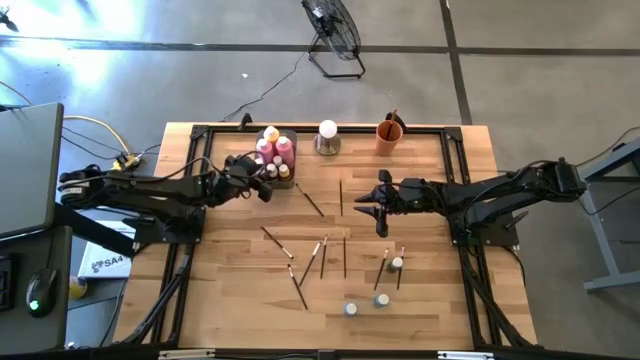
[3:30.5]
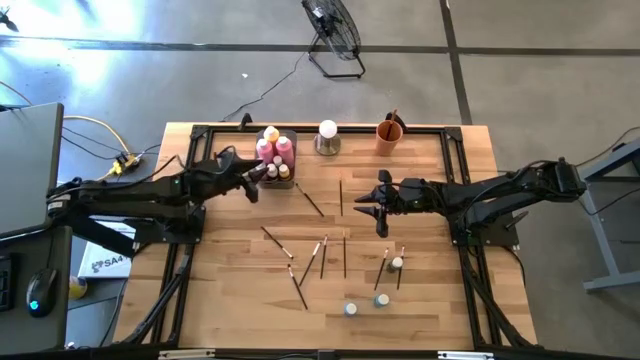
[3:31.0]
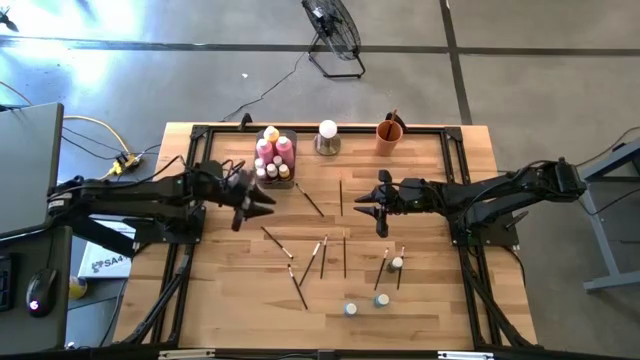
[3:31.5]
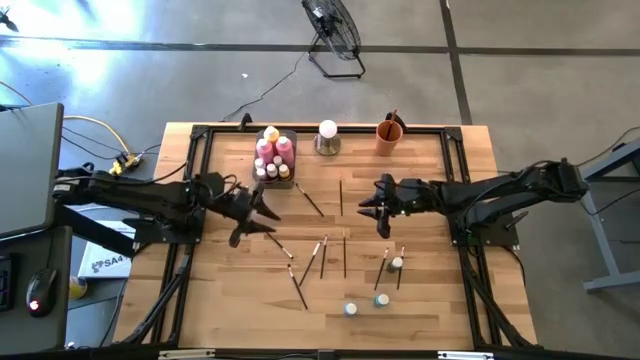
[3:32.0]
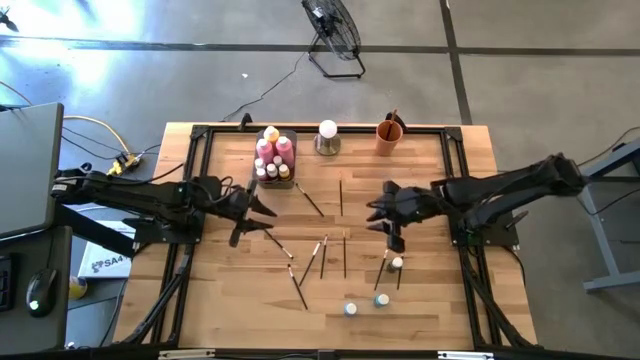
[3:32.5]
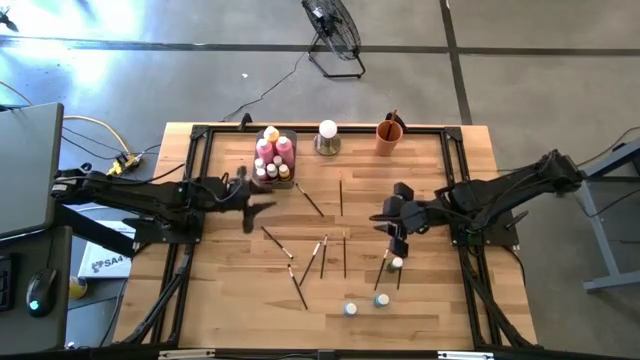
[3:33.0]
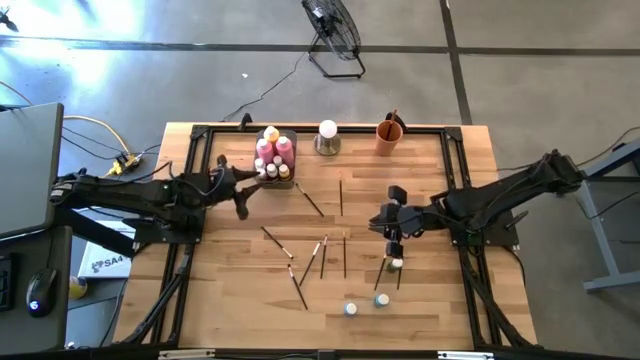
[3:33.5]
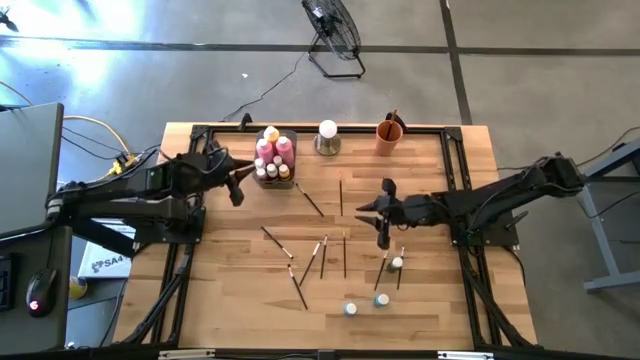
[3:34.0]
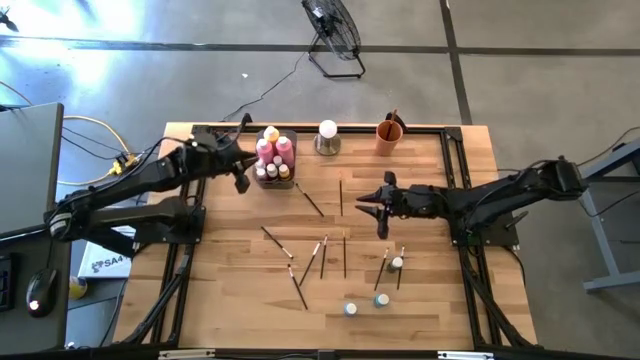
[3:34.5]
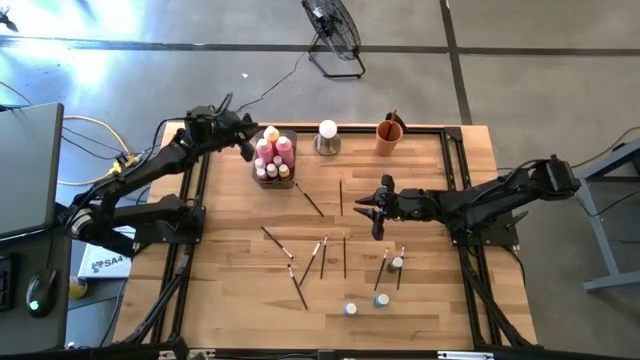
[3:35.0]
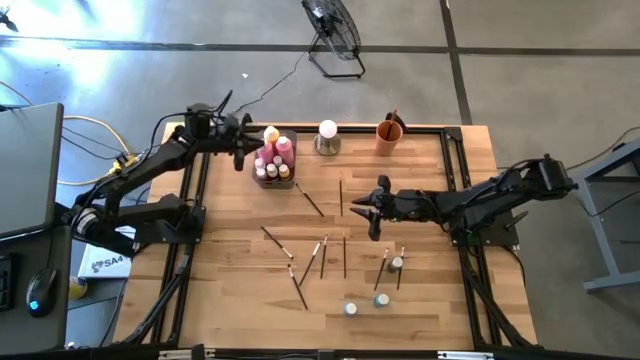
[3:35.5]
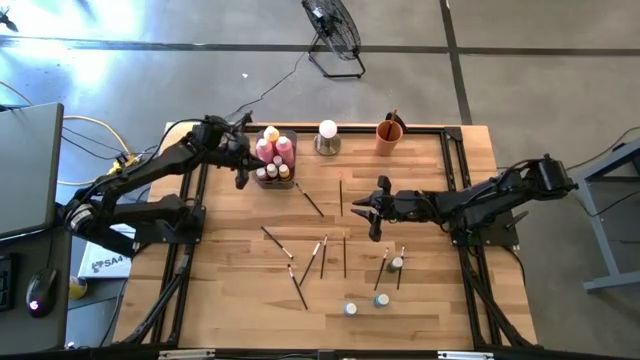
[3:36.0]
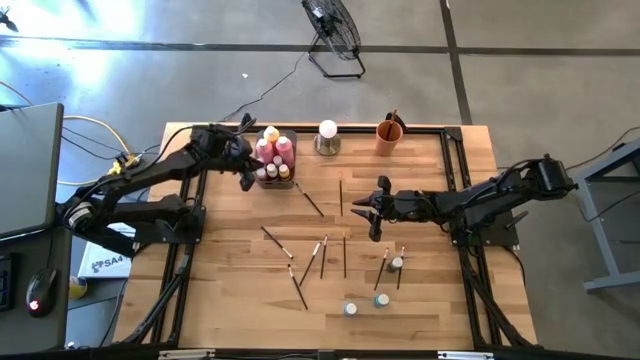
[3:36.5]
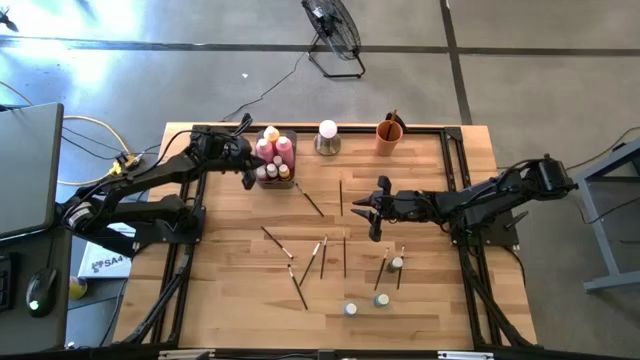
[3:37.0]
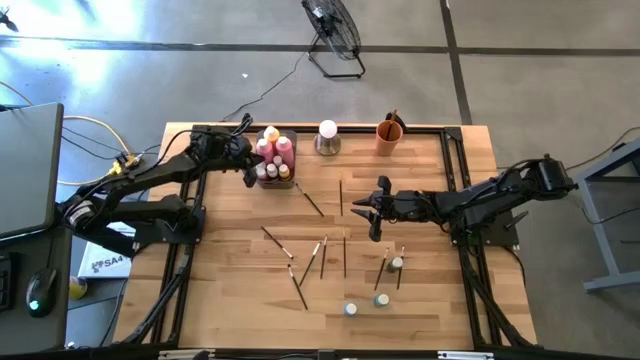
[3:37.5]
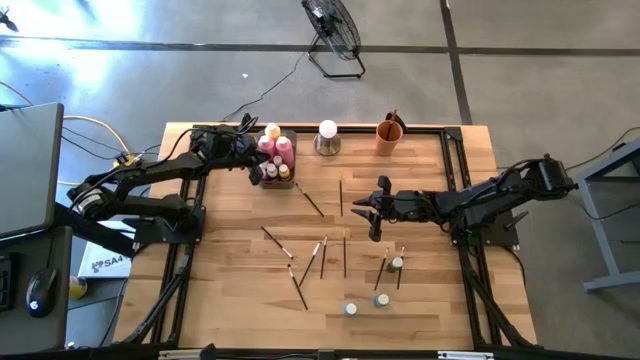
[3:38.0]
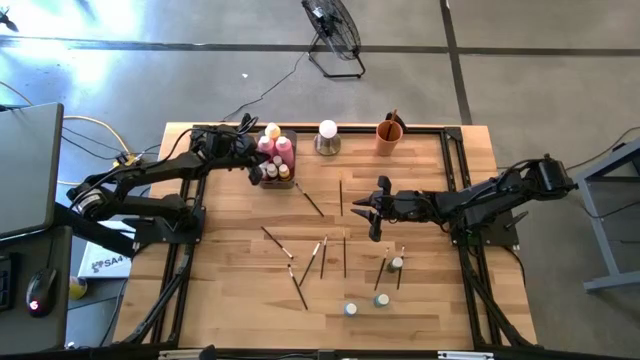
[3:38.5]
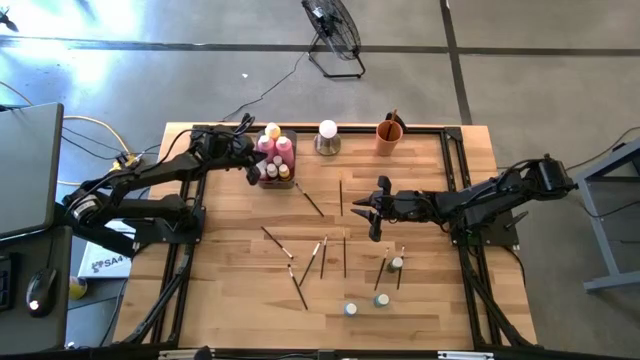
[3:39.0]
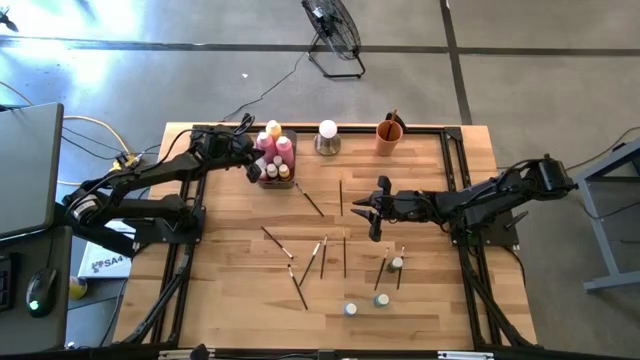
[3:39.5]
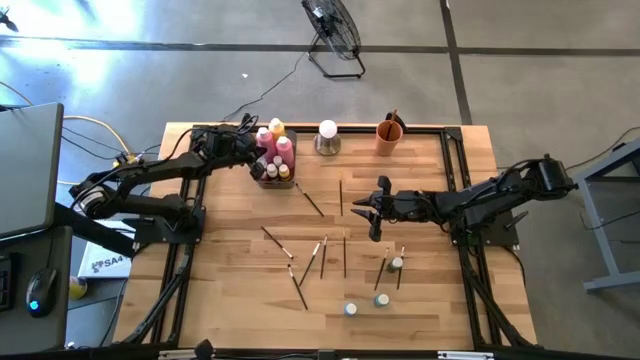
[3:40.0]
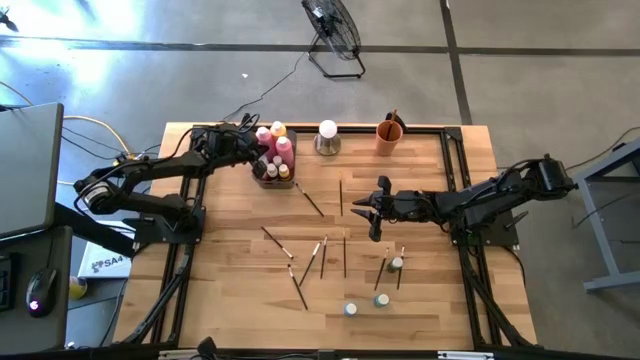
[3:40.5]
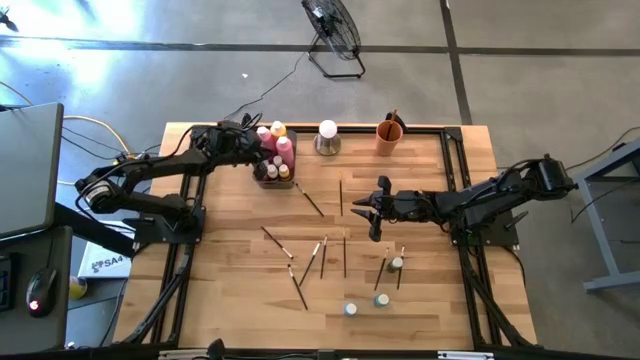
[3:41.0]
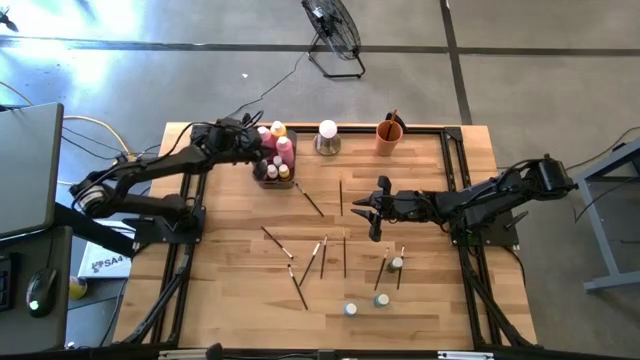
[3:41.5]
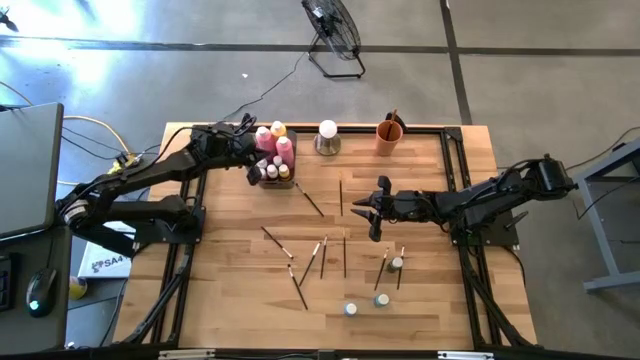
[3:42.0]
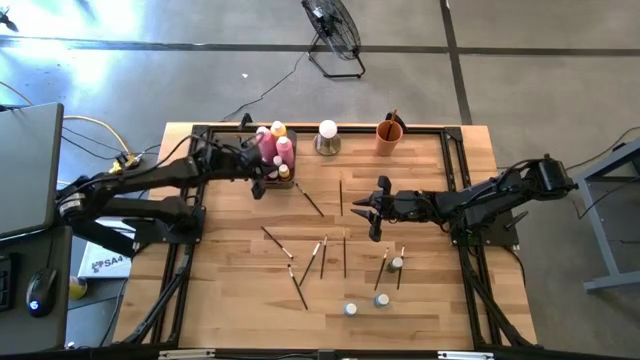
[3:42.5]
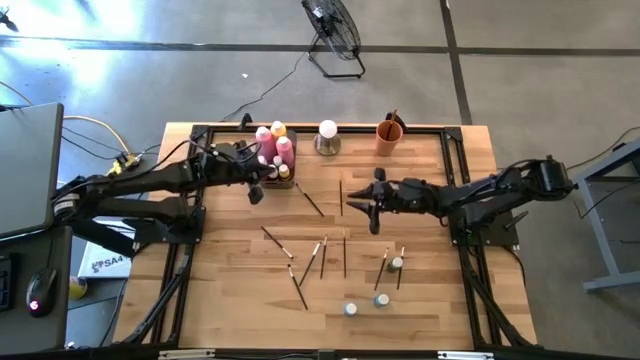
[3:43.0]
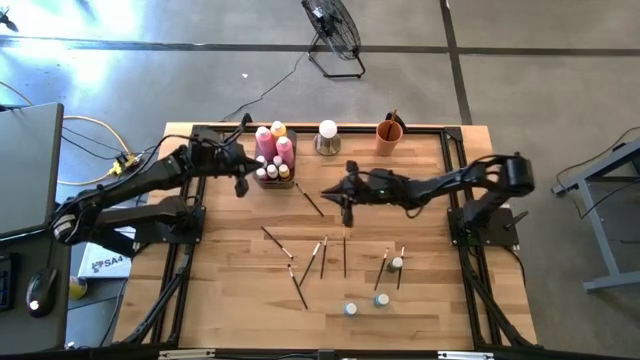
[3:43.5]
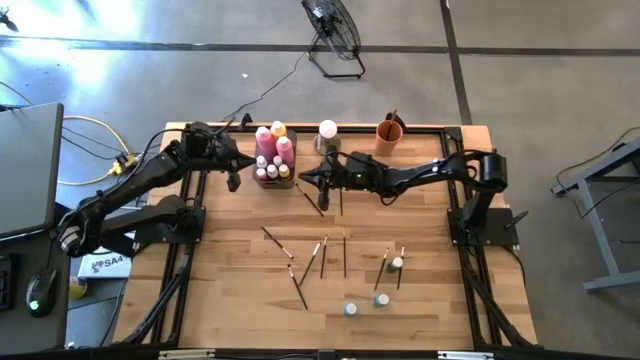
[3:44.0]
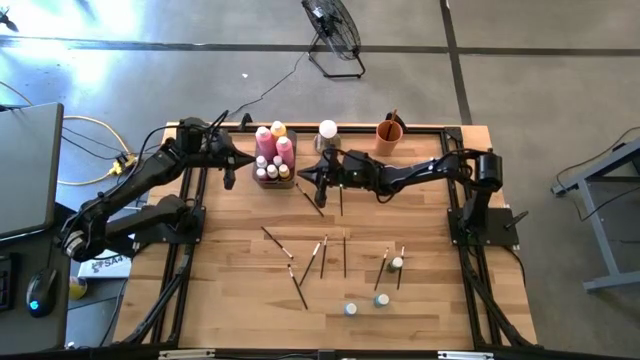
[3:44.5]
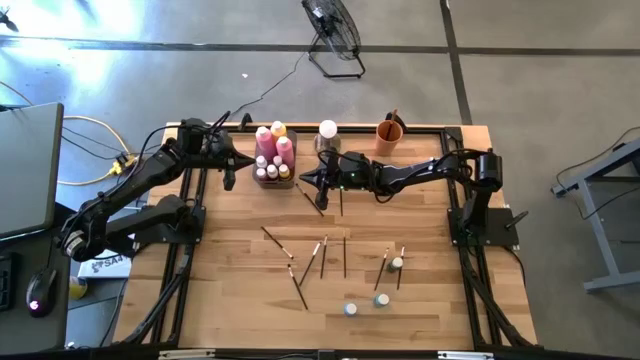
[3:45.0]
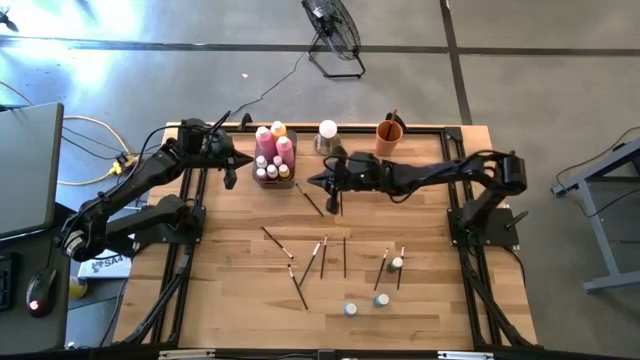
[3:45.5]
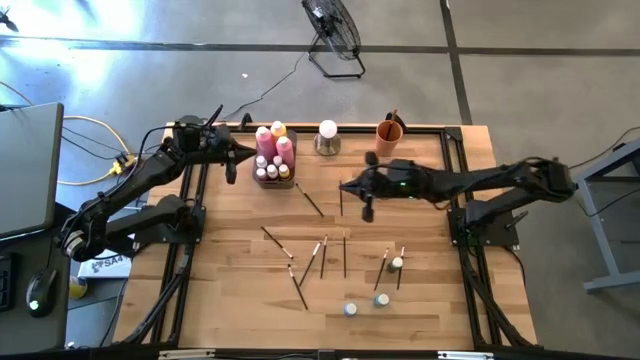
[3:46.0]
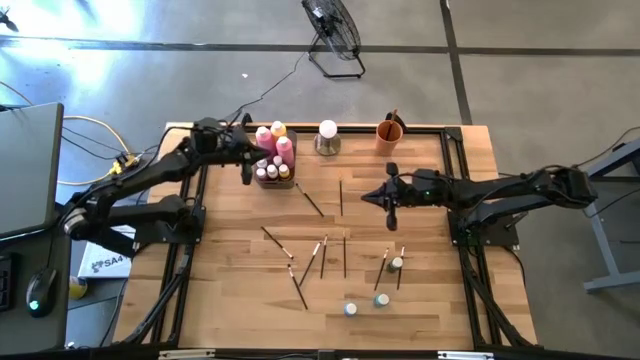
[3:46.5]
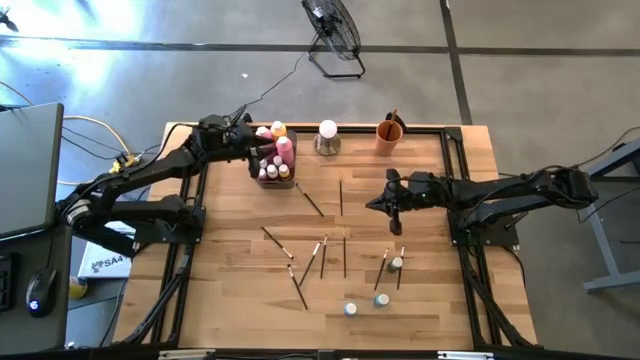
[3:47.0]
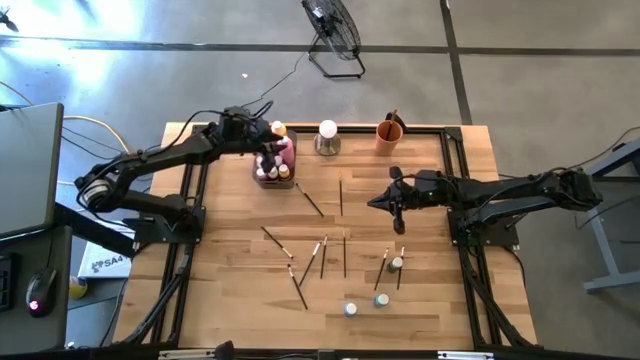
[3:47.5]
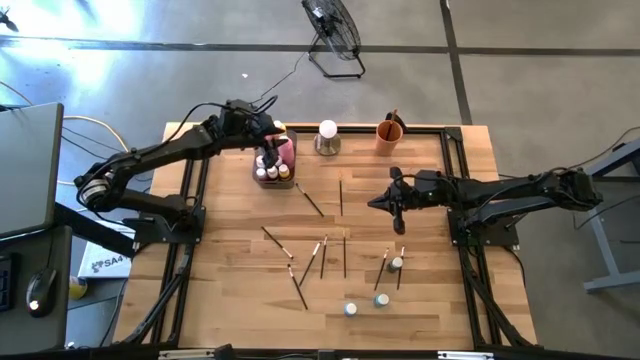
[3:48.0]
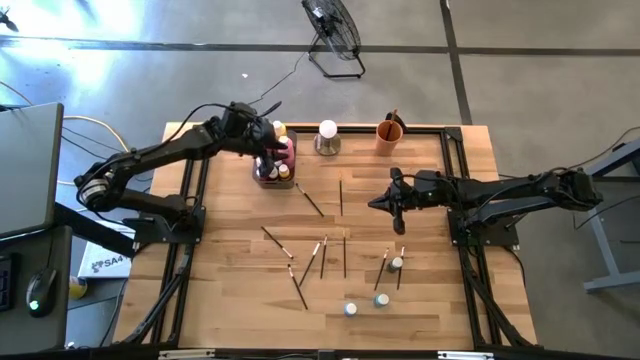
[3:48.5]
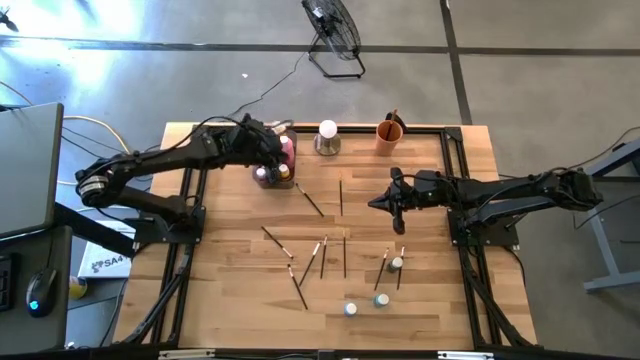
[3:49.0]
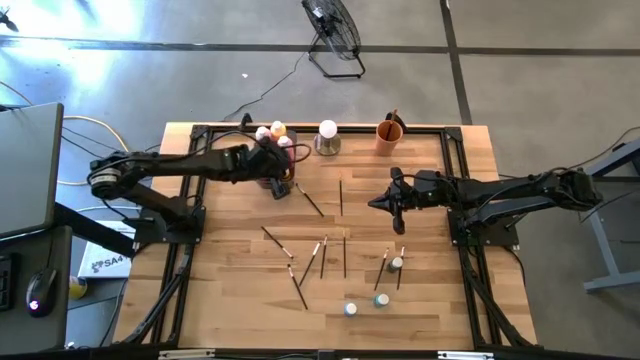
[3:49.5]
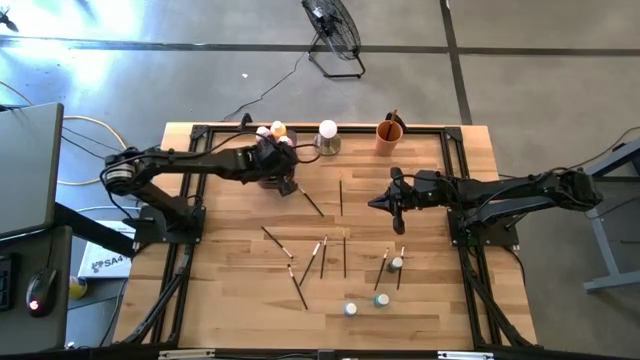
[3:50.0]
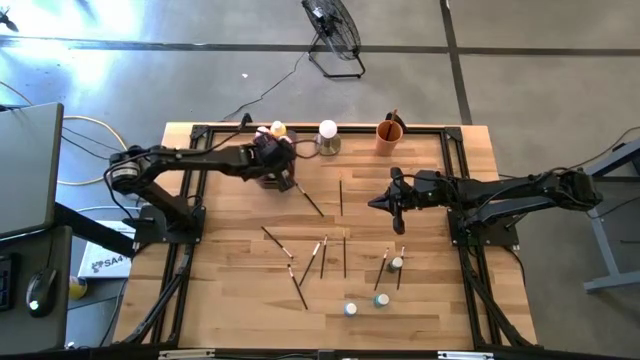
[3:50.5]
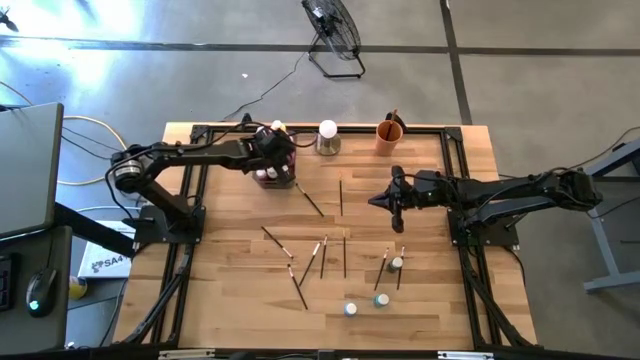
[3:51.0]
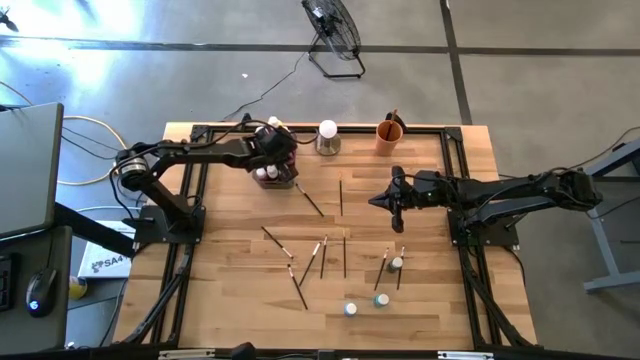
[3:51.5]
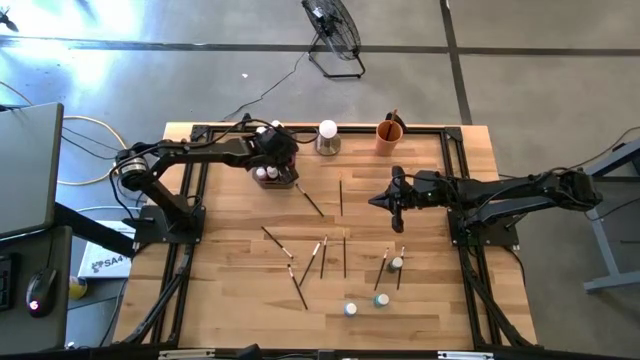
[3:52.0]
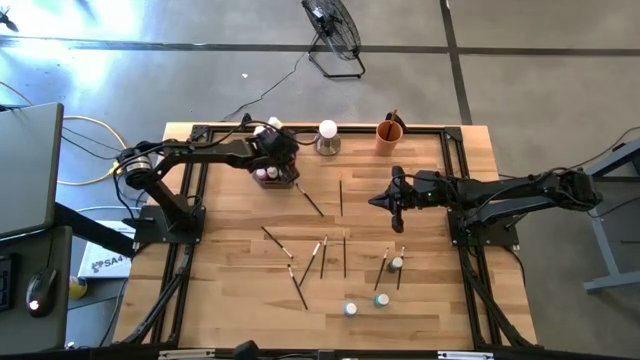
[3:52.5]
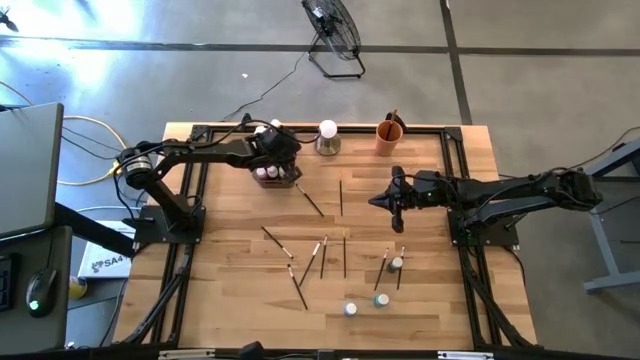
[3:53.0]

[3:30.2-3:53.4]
Task: Pick & Place Paint Supplies
Adjust the large pink paint bottles
